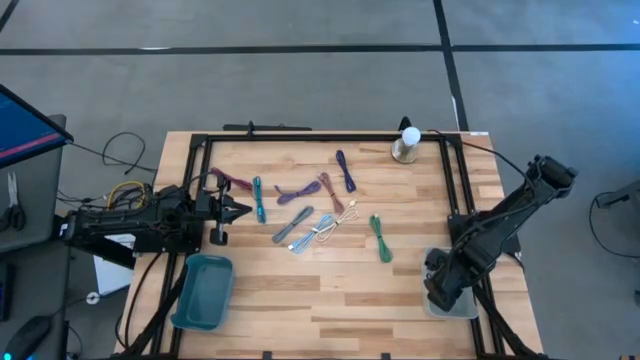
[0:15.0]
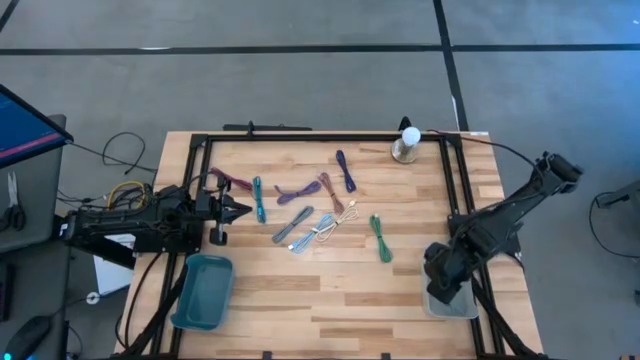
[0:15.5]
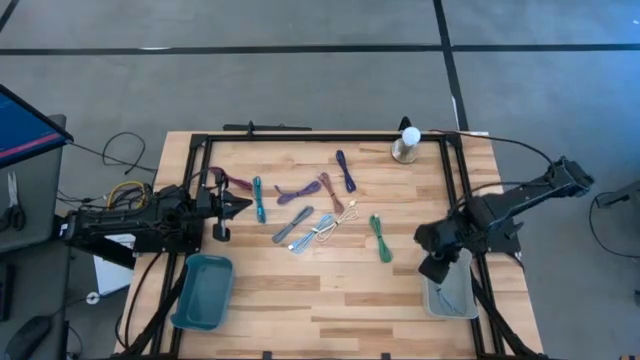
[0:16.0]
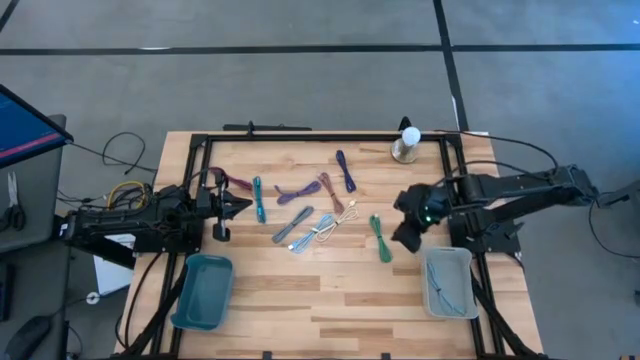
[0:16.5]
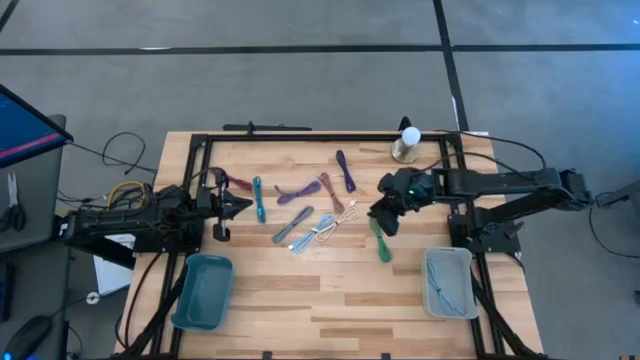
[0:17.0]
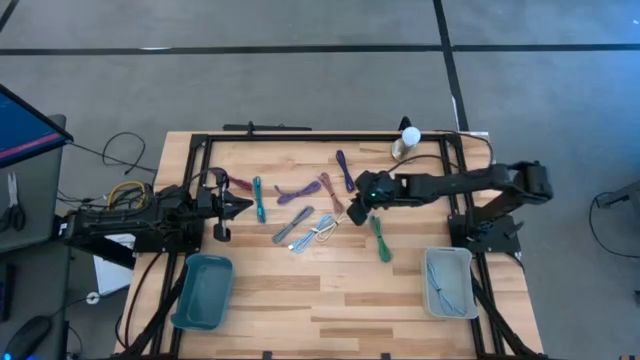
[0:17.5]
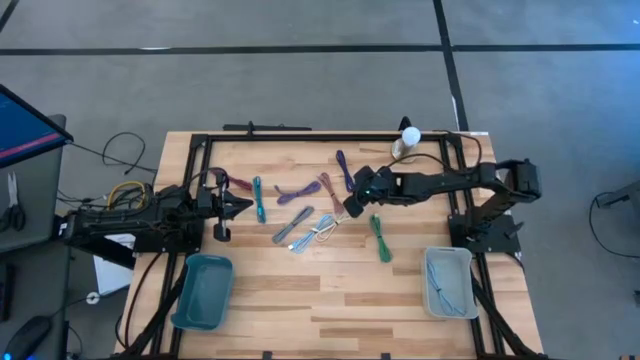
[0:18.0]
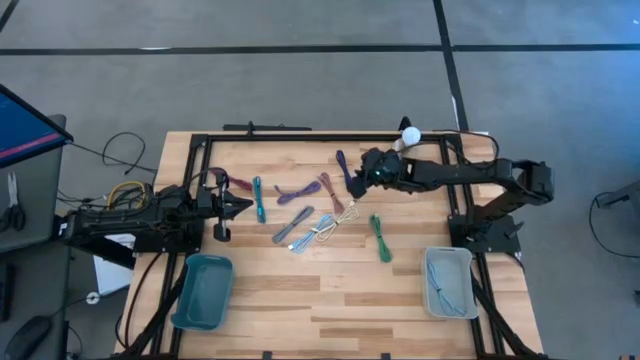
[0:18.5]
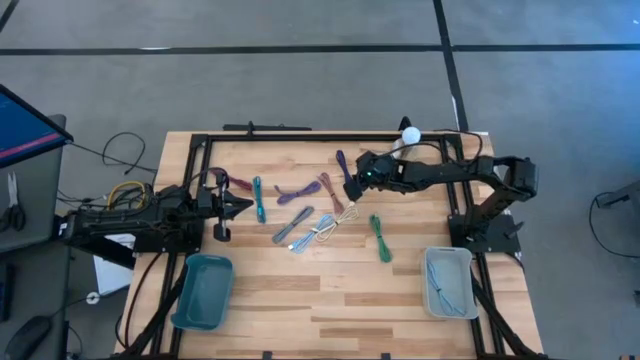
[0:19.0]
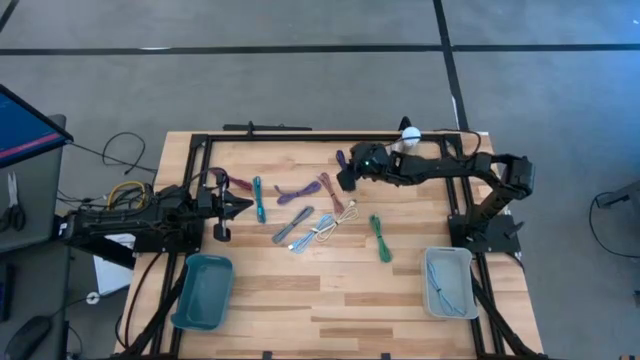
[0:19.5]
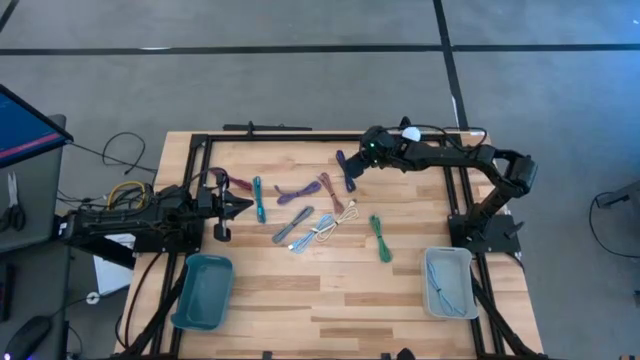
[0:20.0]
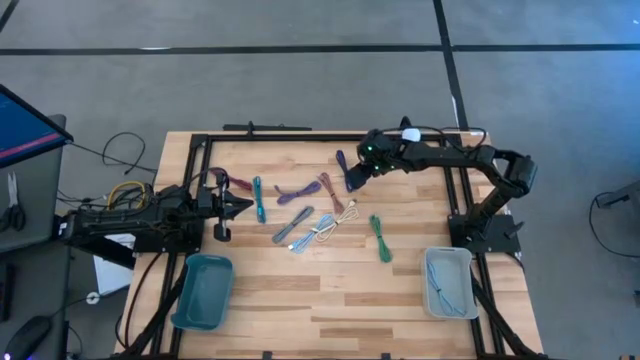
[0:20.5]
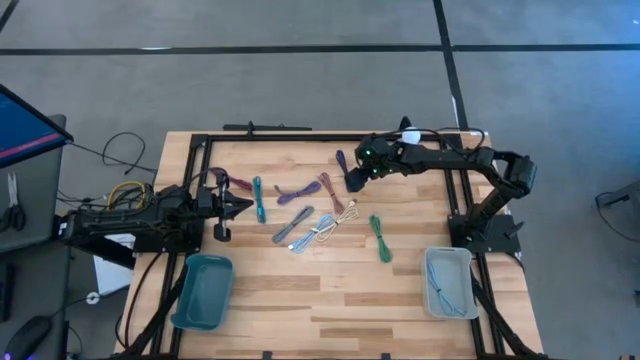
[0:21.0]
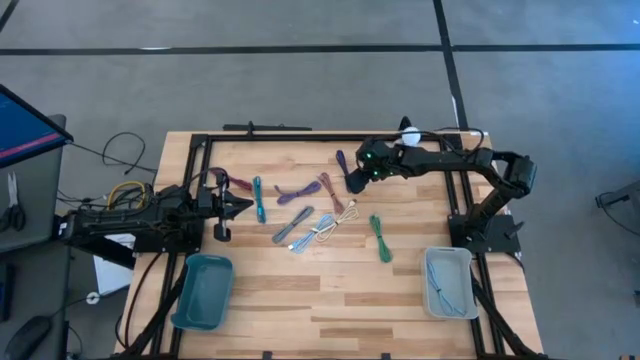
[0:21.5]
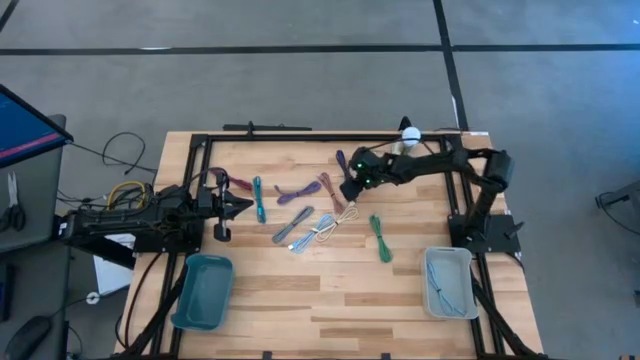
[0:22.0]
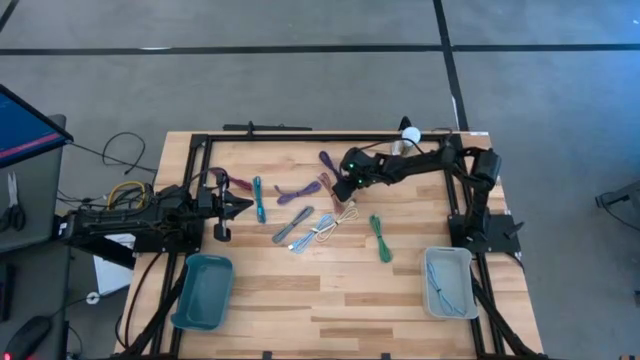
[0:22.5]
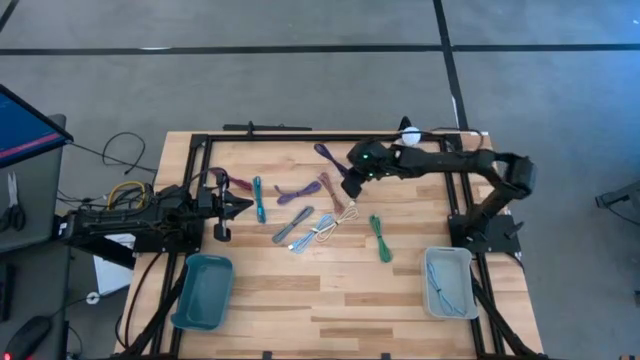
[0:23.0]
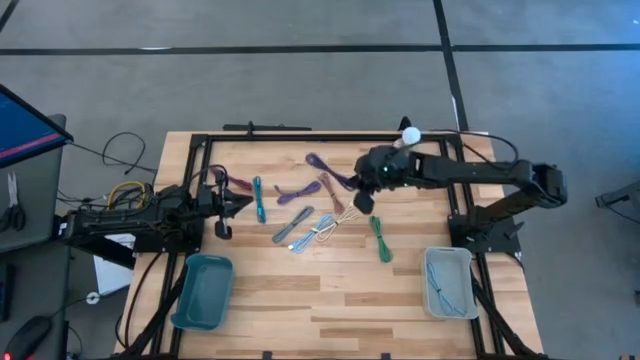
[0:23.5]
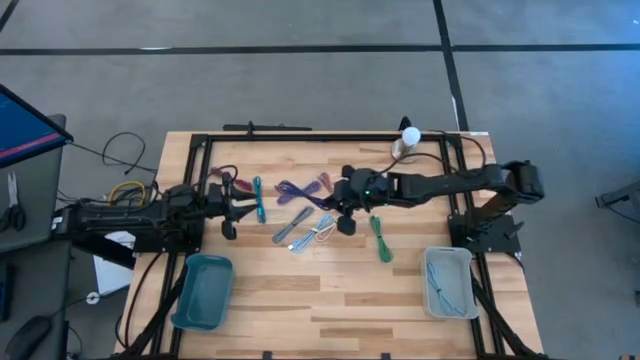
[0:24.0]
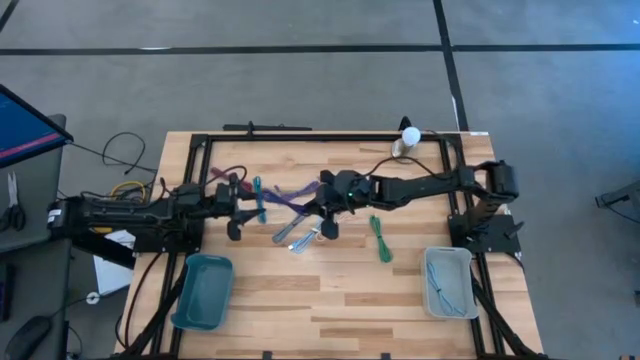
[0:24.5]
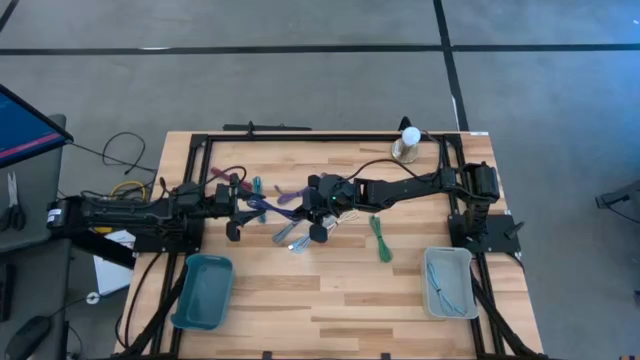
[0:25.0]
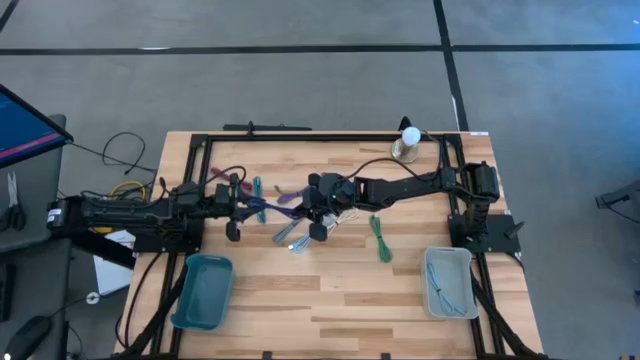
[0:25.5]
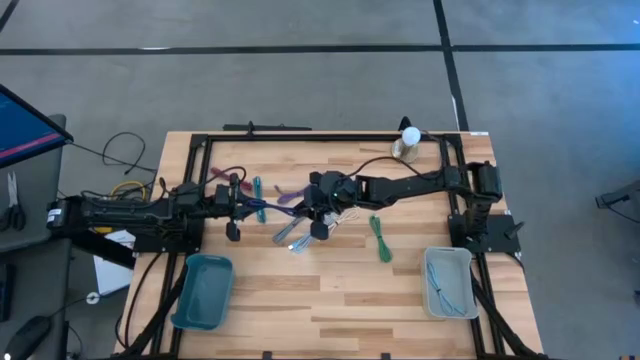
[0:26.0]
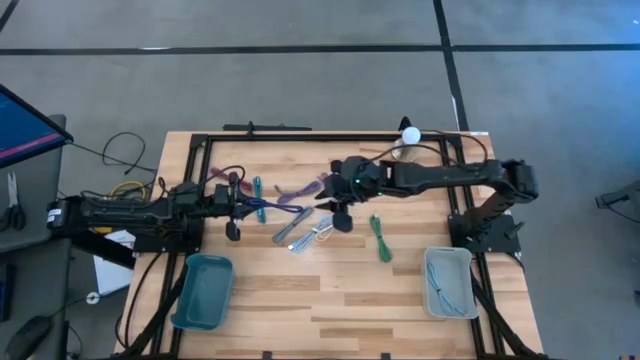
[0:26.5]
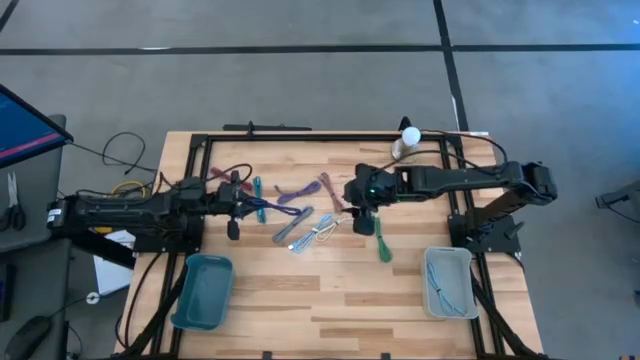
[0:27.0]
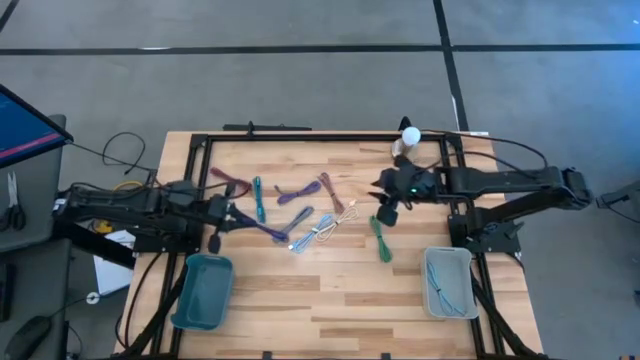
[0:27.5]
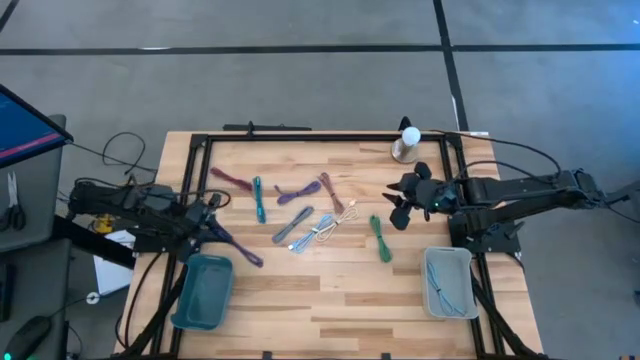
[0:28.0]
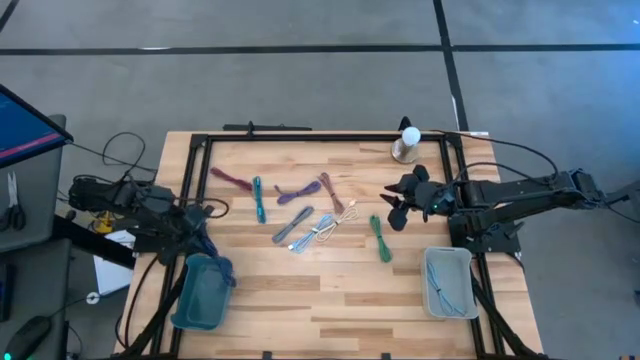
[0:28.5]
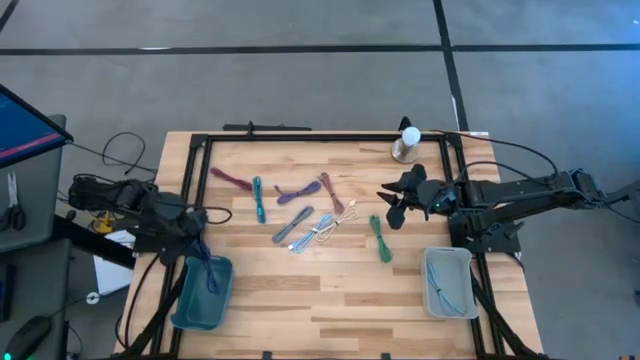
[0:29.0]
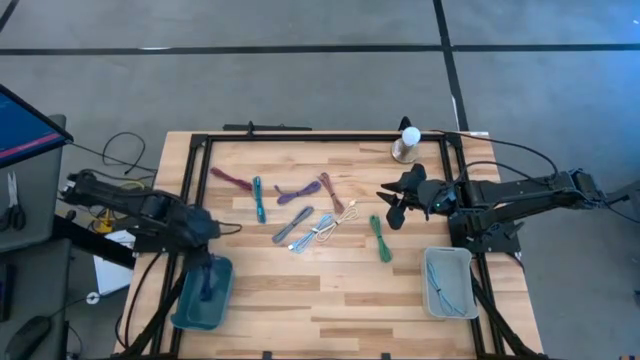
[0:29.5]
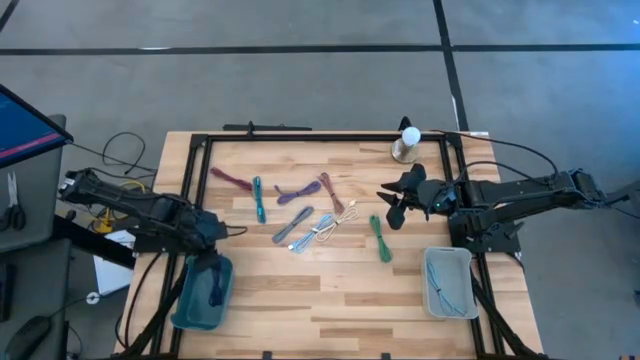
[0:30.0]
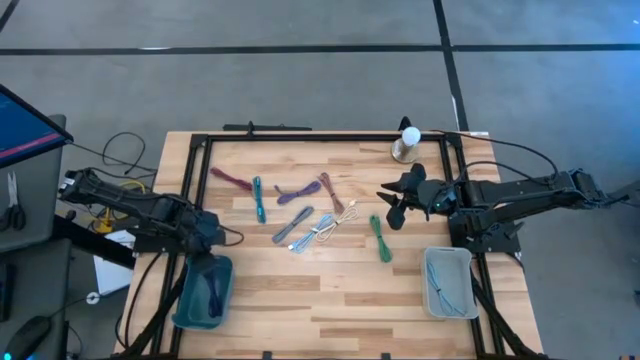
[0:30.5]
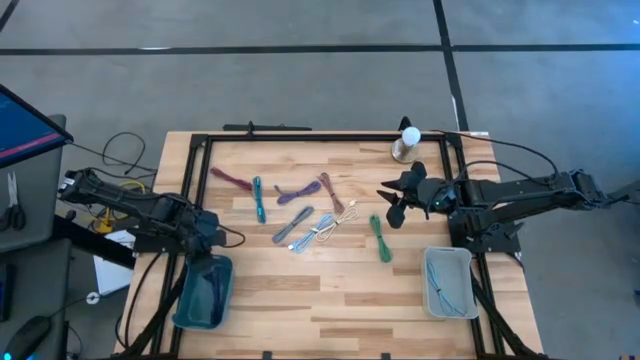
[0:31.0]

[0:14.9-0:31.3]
Task: Pick & Place USB Port
Put the blue patterned USB cable into the blue bin

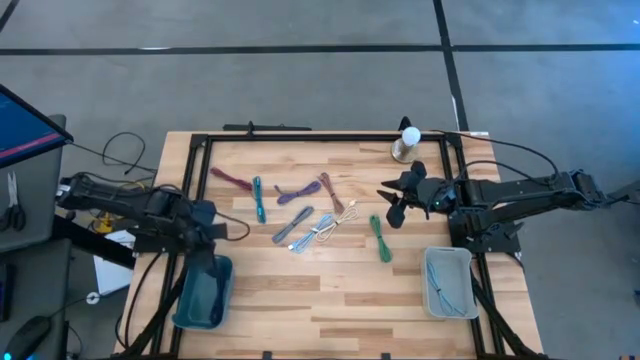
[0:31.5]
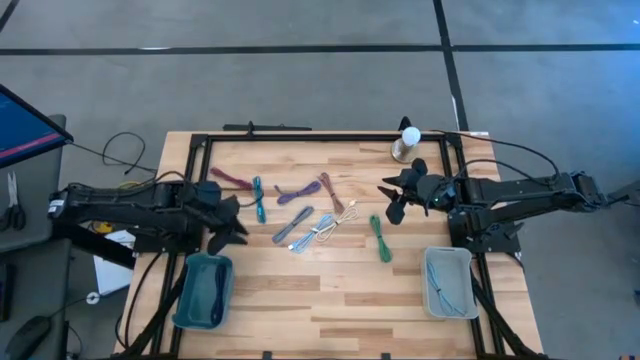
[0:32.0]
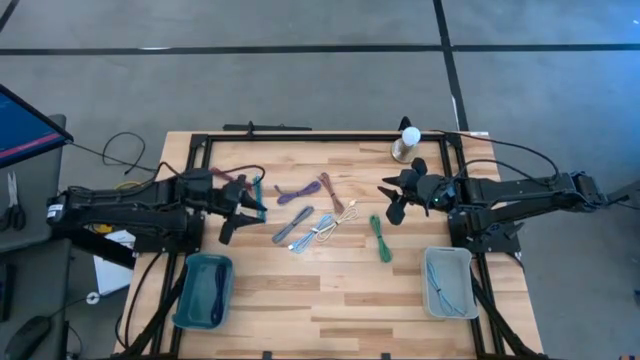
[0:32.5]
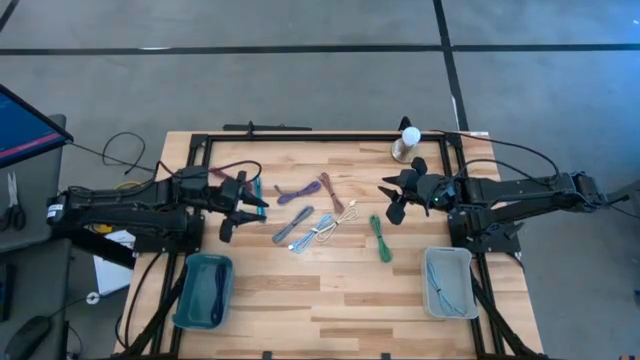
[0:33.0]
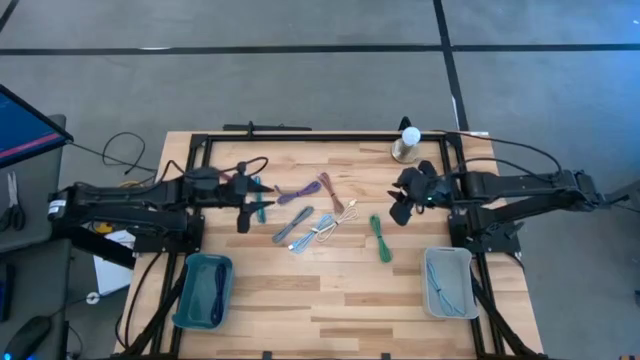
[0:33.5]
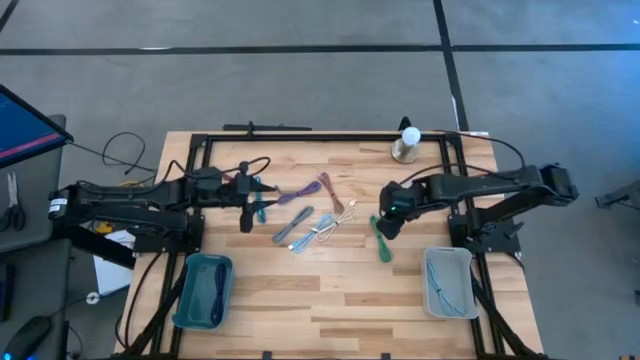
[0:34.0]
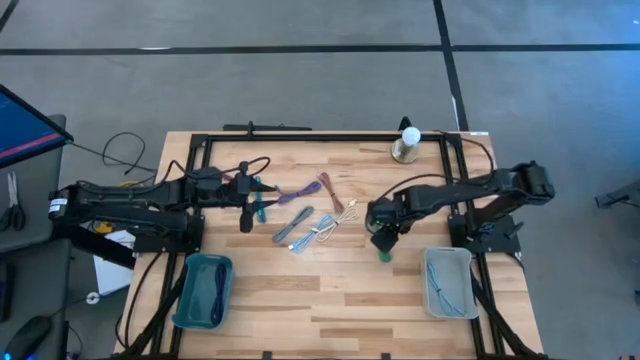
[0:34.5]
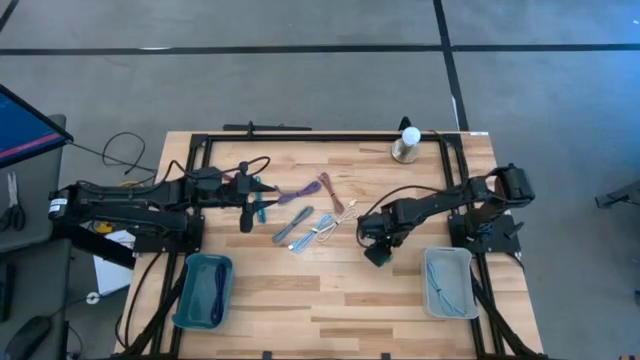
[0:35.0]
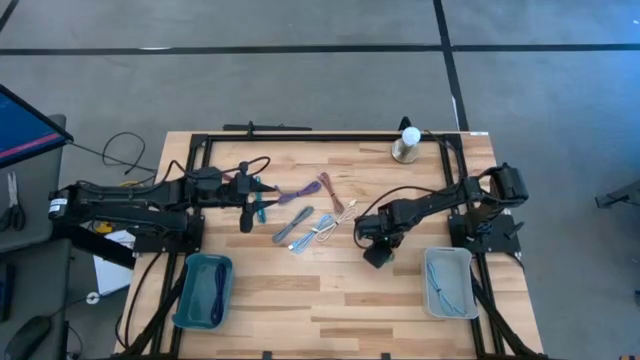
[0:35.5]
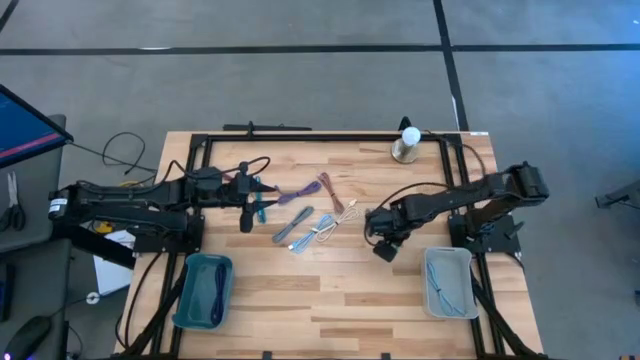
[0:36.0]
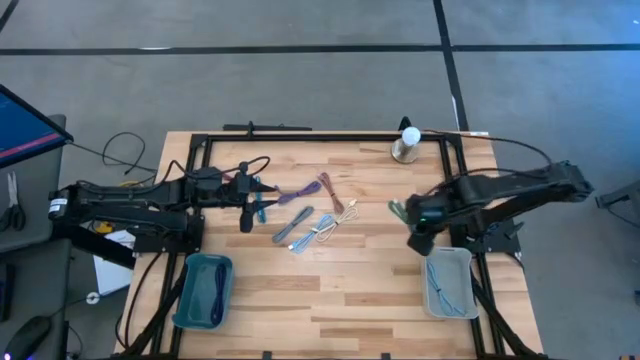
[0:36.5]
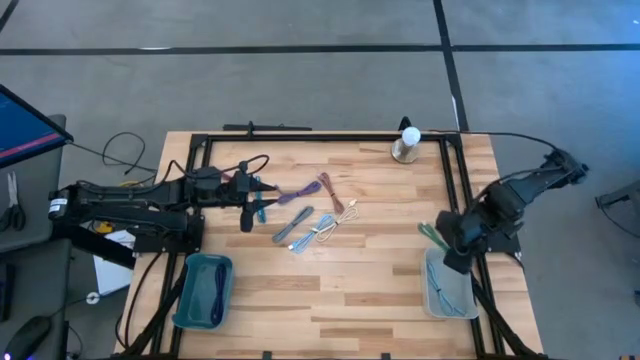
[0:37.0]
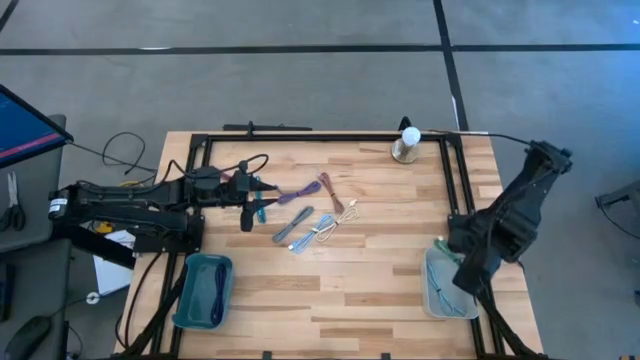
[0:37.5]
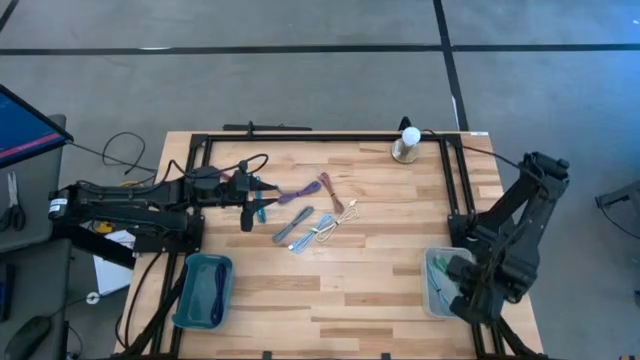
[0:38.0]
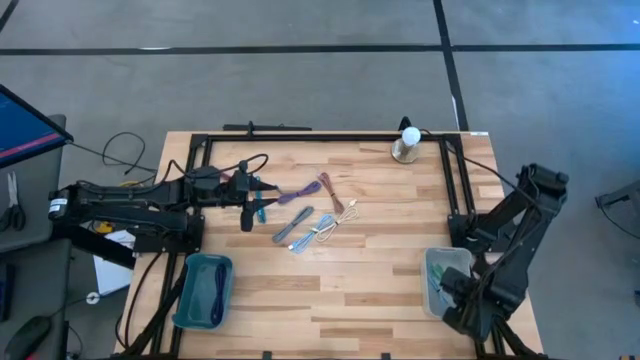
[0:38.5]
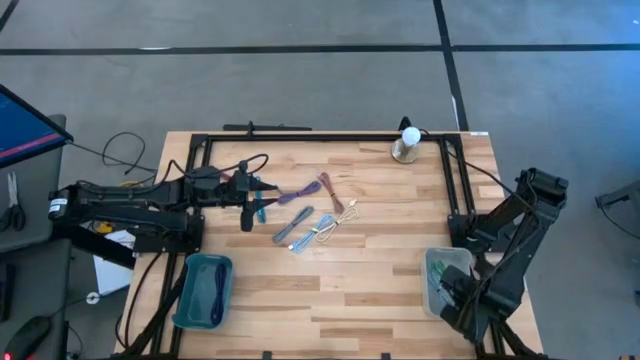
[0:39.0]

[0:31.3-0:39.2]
Put the green USB cable into the gray bin
